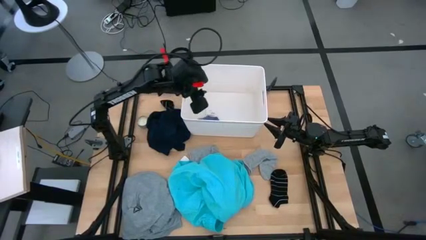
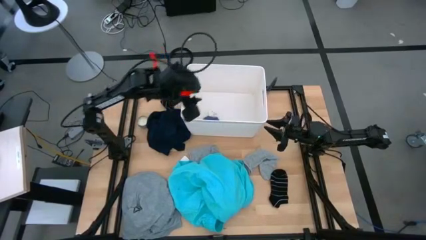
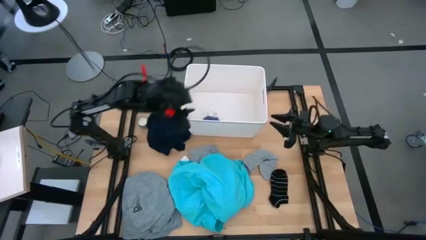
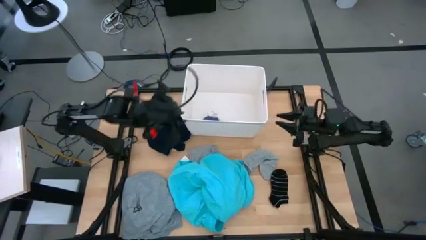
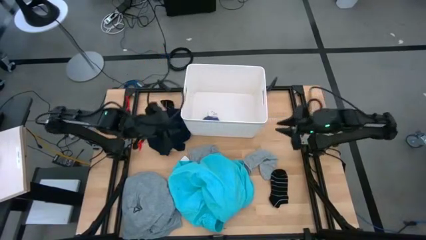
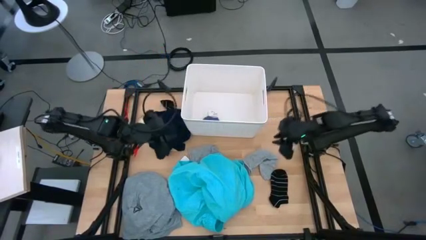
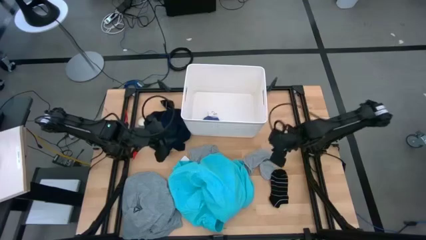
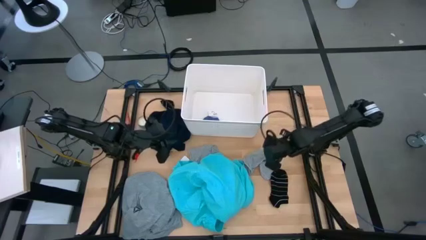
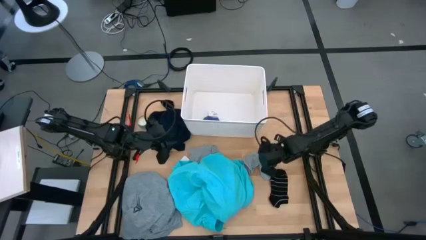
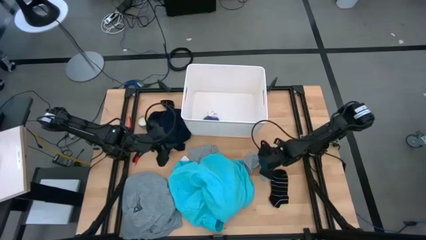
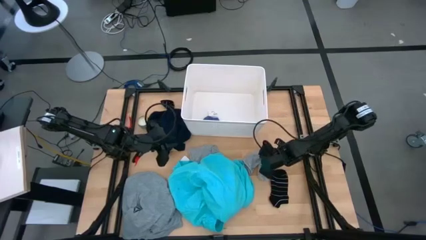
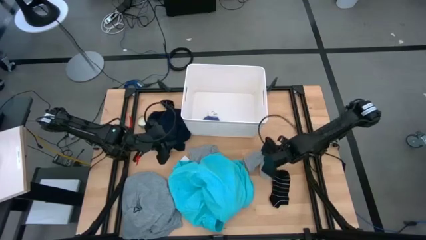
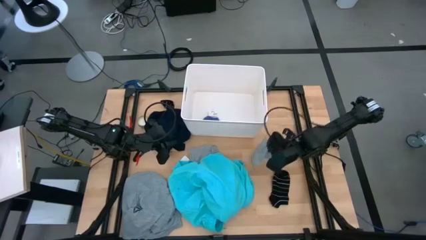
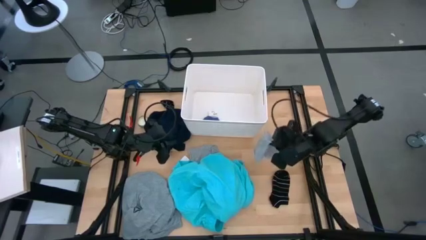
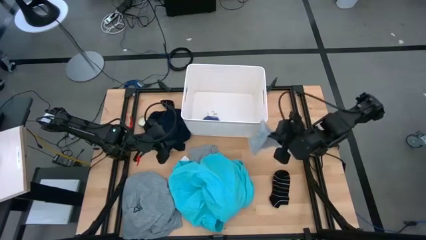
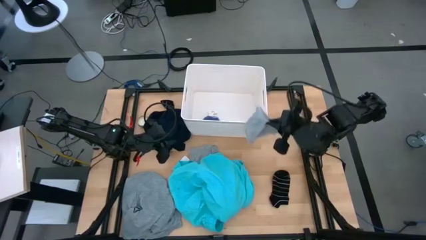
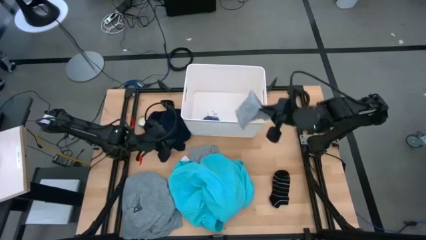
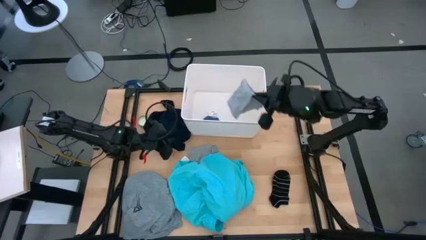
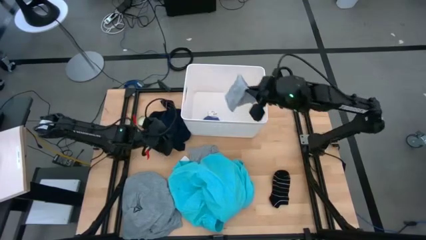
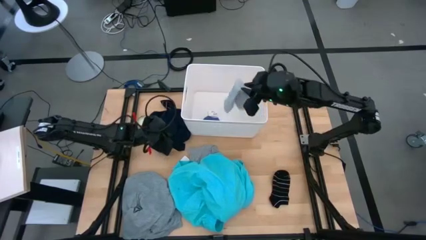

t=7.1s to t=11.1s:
Task: Sort clothes
Put the right gray sock into the white laundry bin

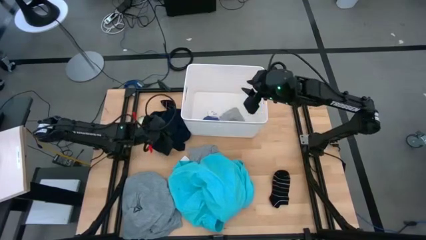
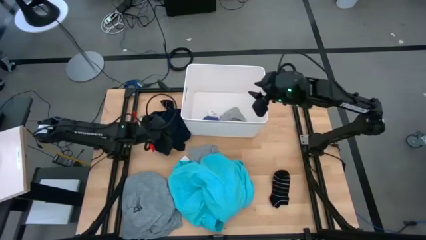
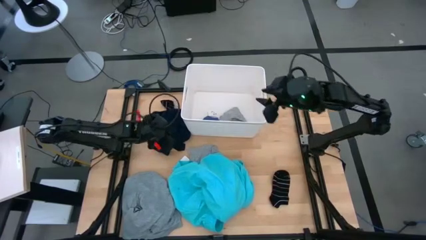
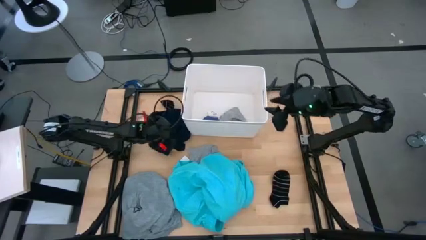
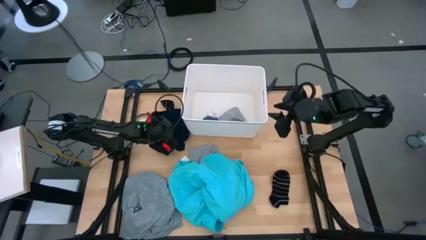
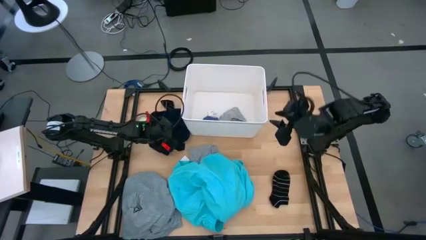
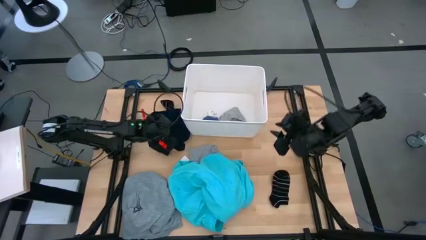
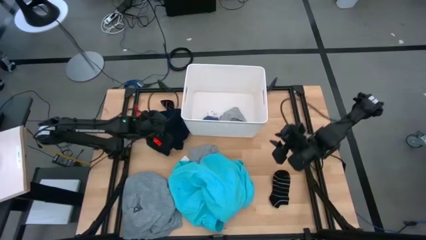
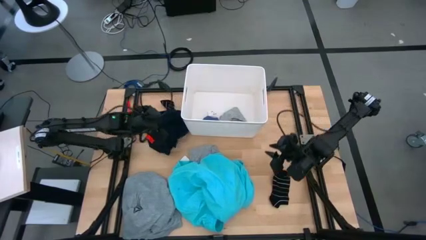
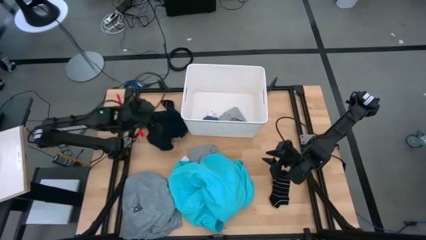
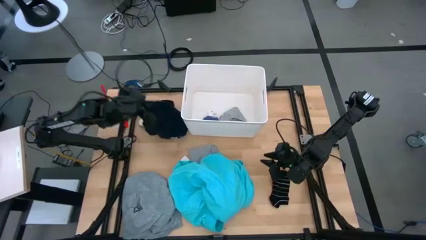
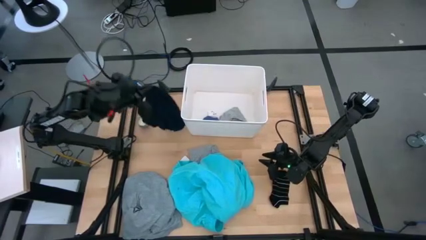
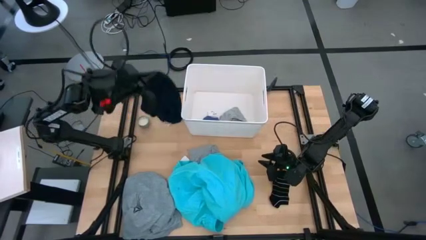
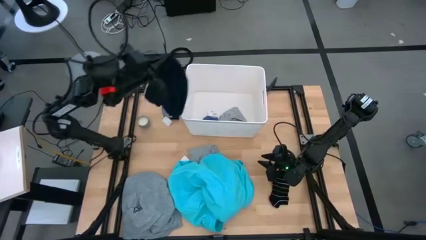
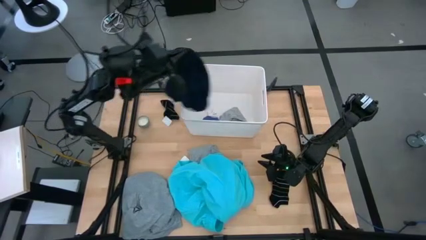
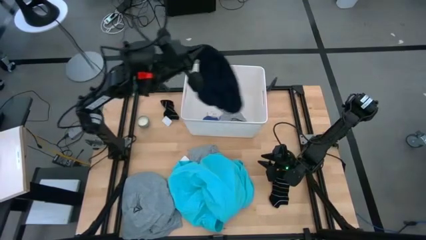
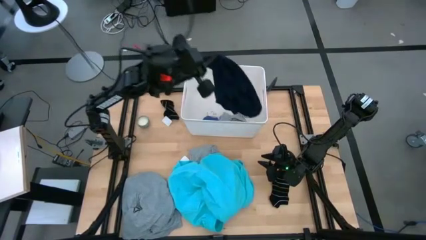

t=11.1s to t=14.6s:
Put the dark blue boxer into the white laundry bin

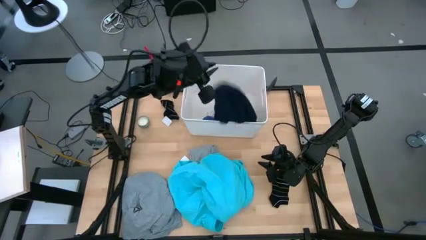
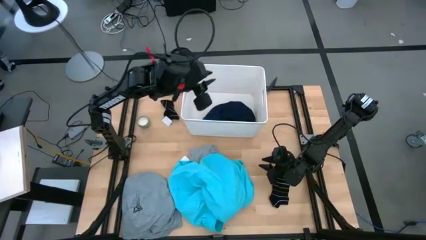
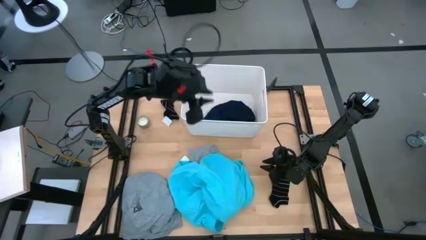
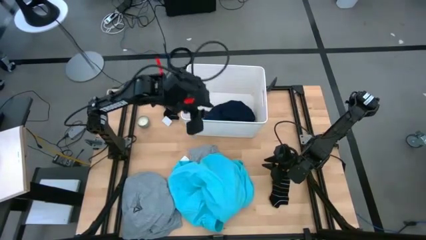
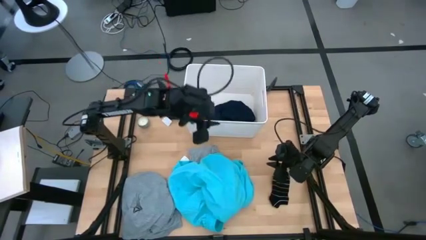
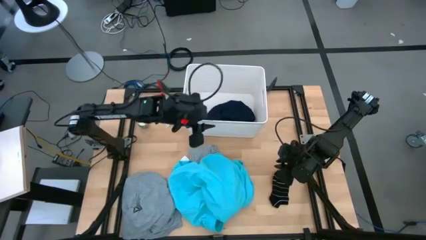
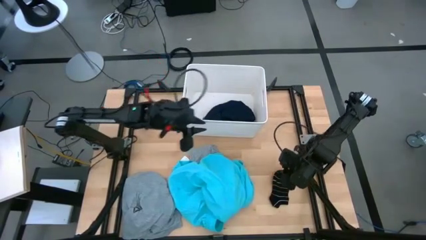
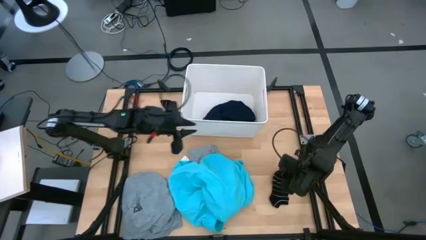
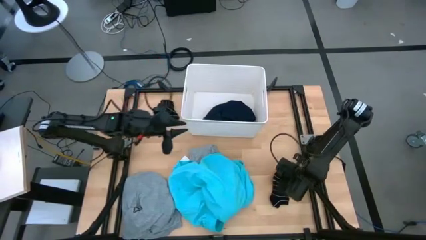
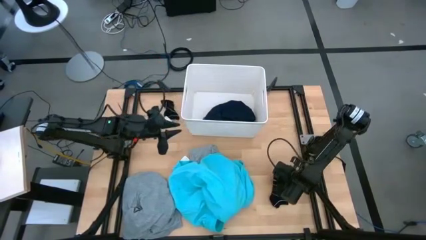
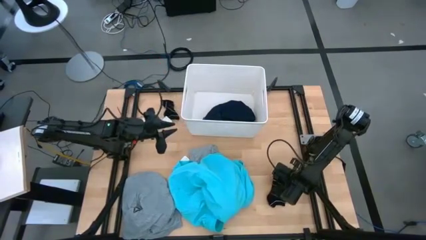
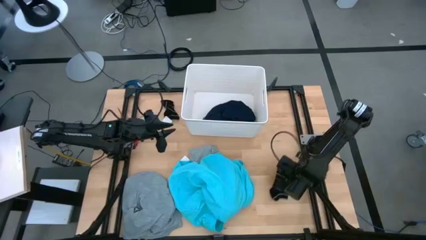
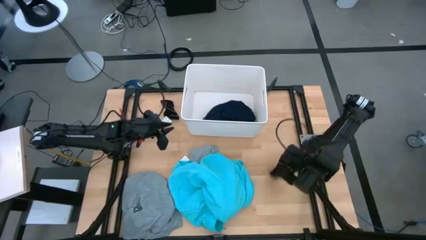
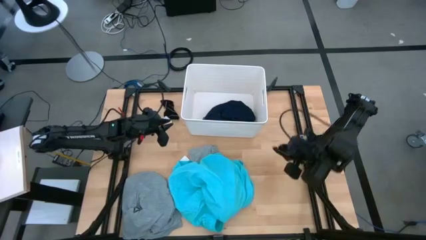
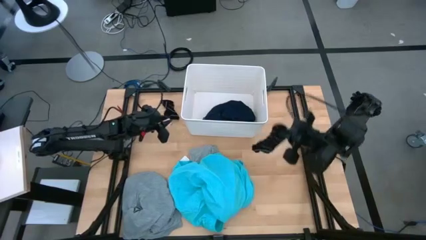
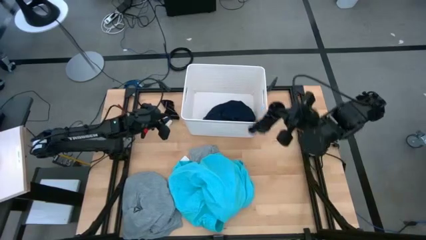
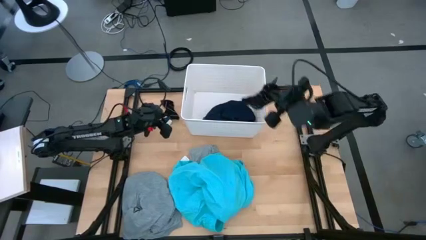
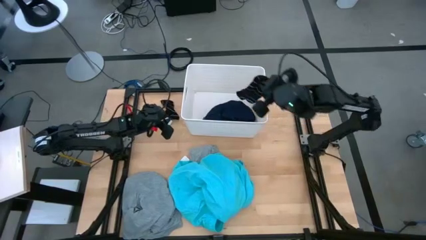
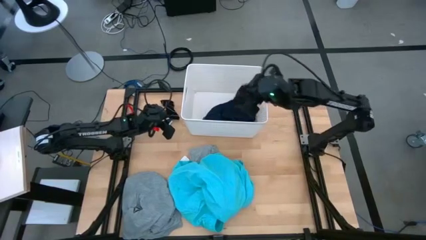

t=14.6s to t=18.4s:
Put the bottom black sock into the white laundry bin

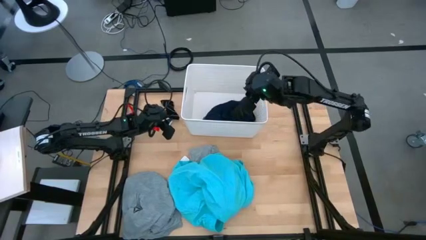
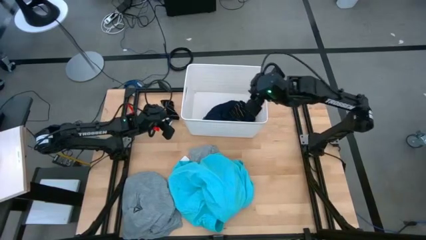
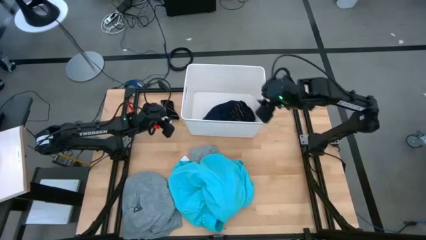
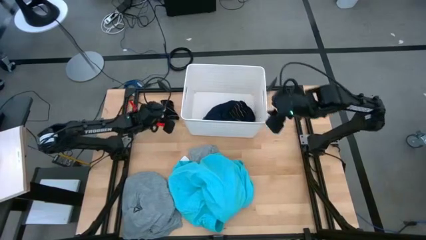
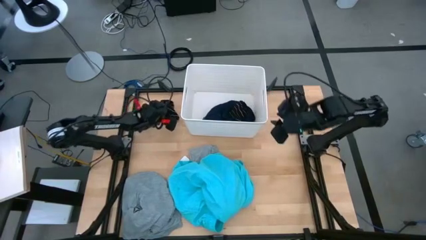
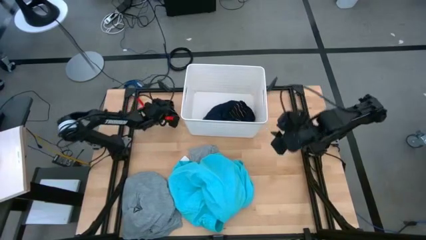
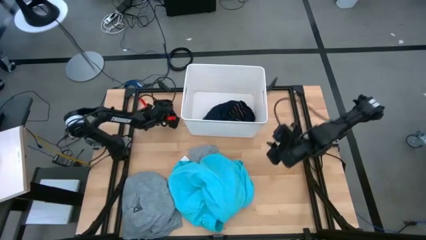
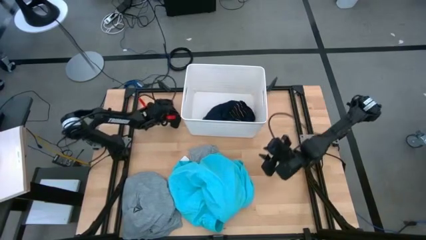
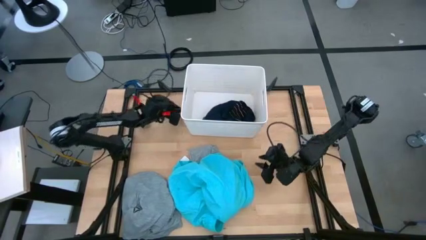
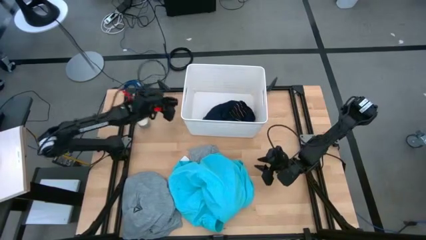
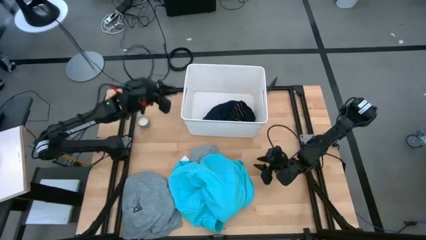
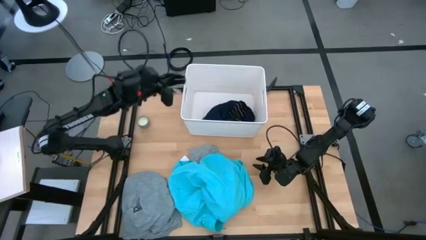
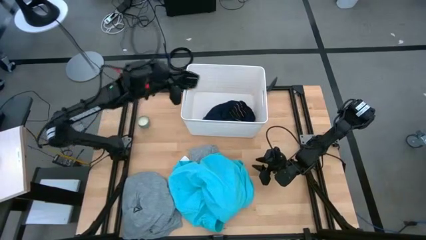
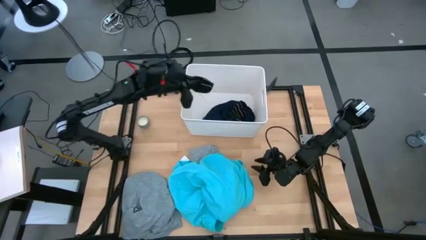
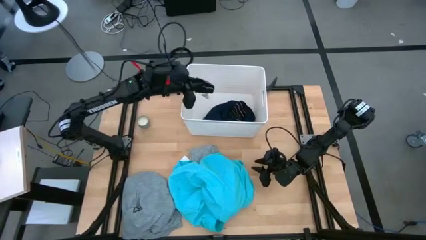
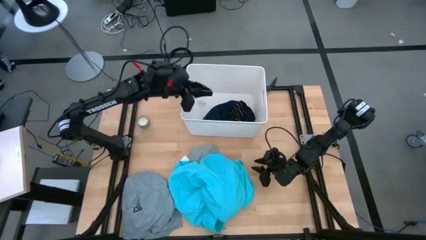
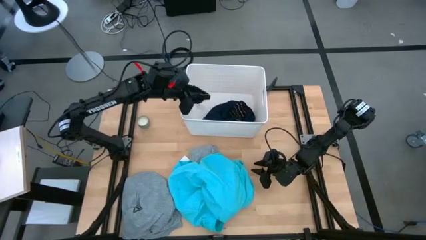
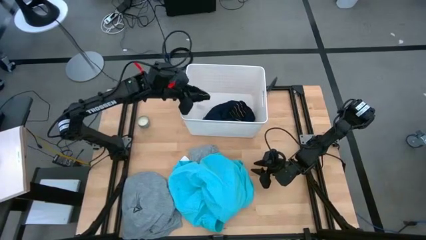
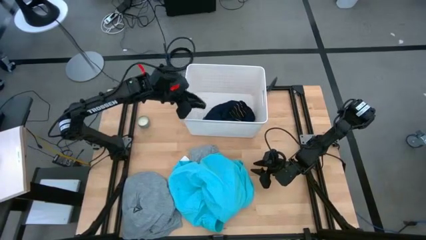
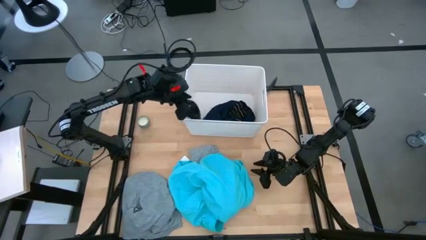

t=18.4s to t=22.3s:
Put the black sock into the white laundry bin
